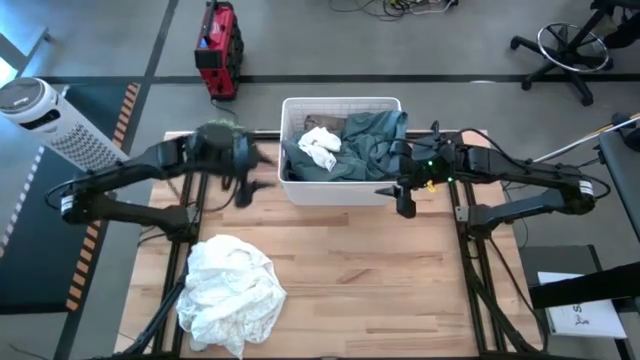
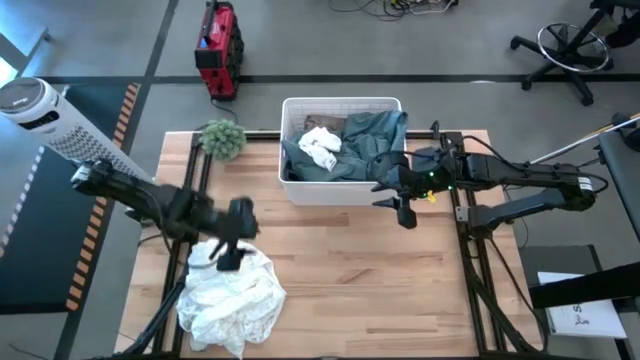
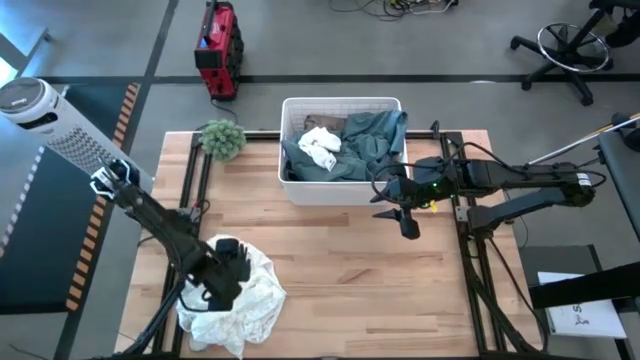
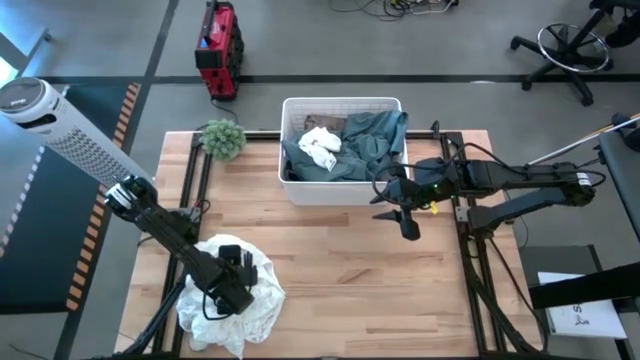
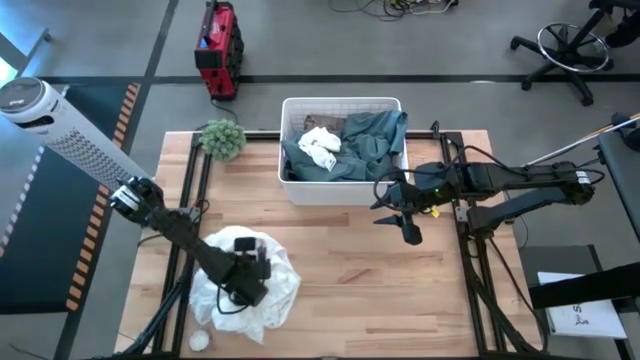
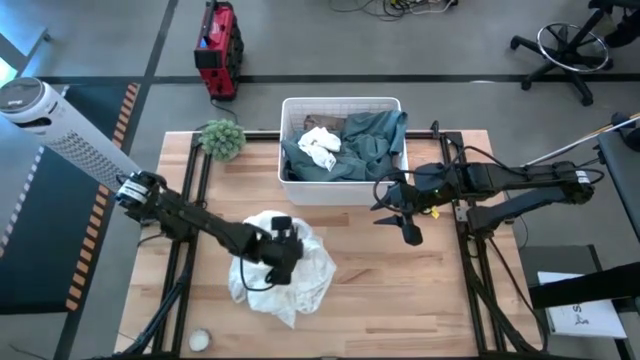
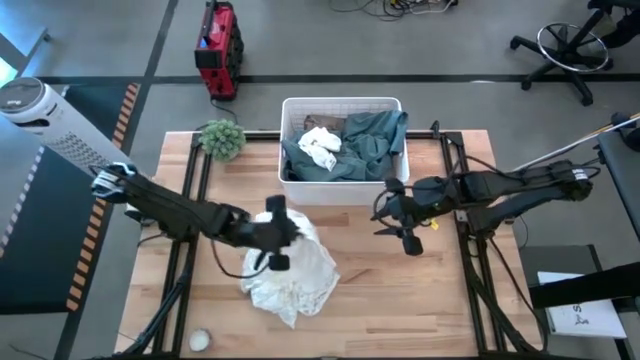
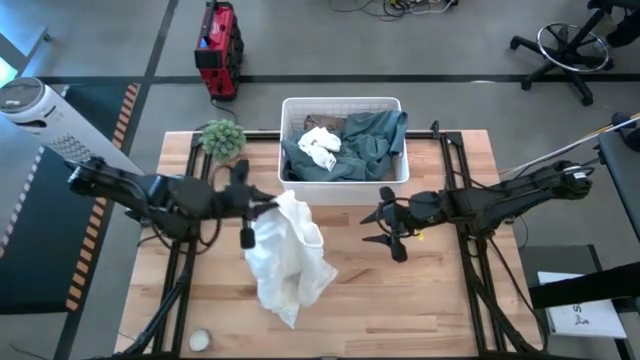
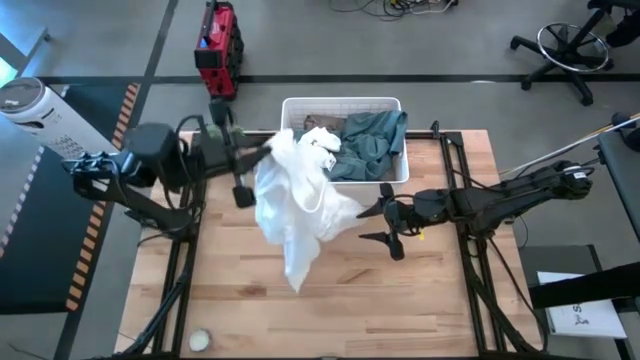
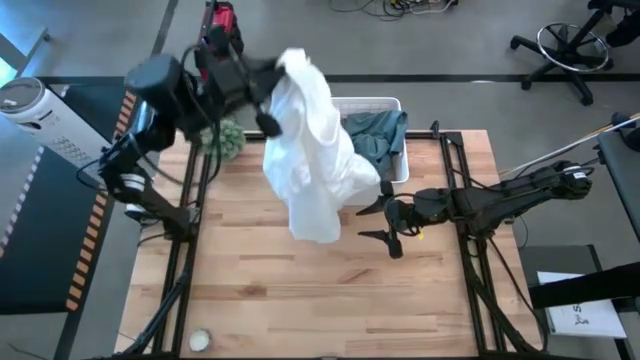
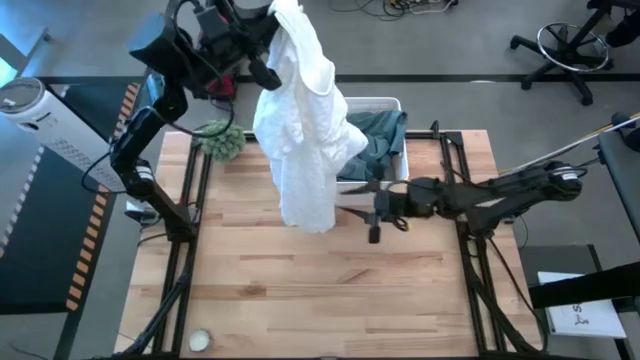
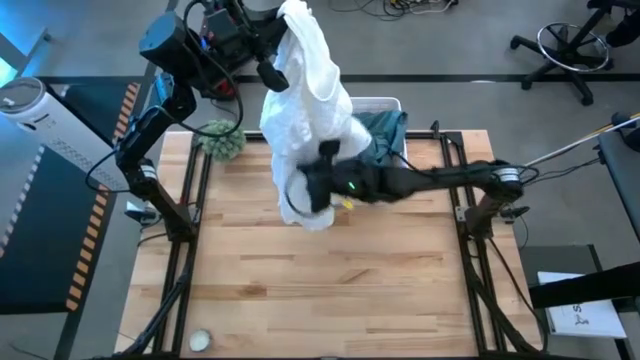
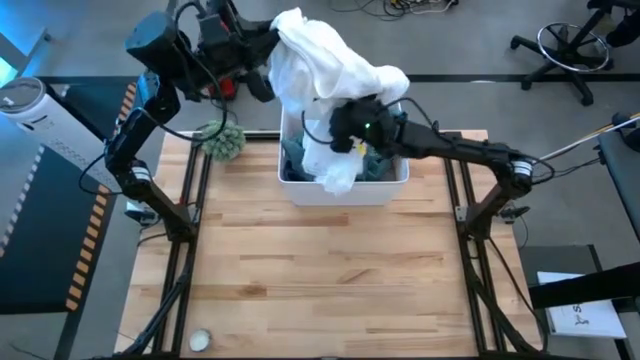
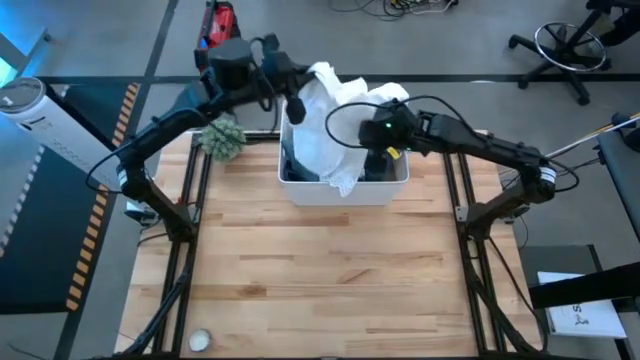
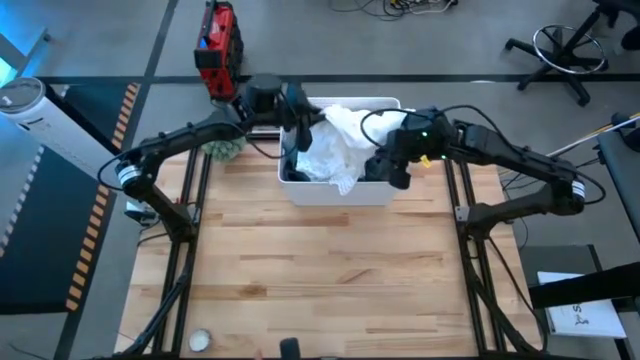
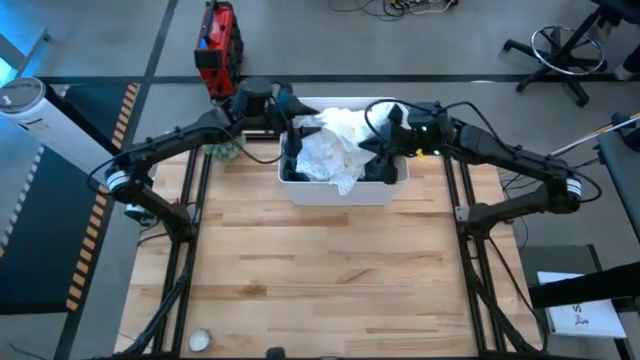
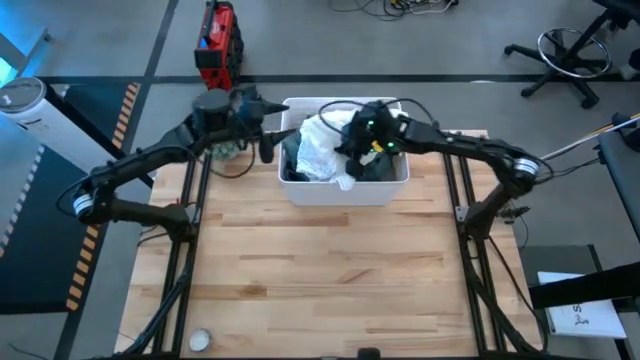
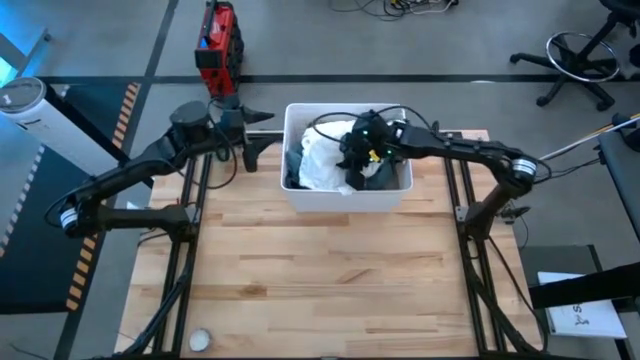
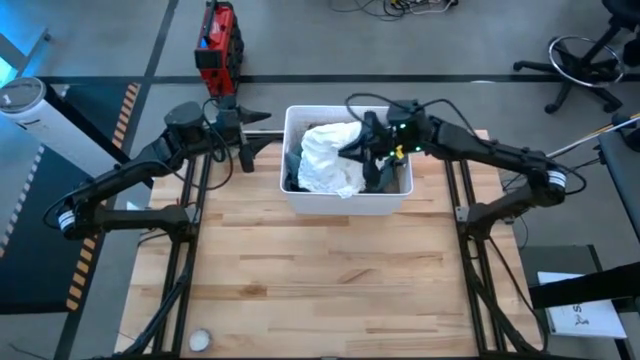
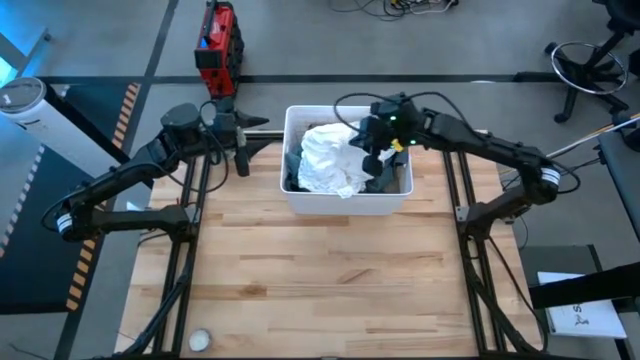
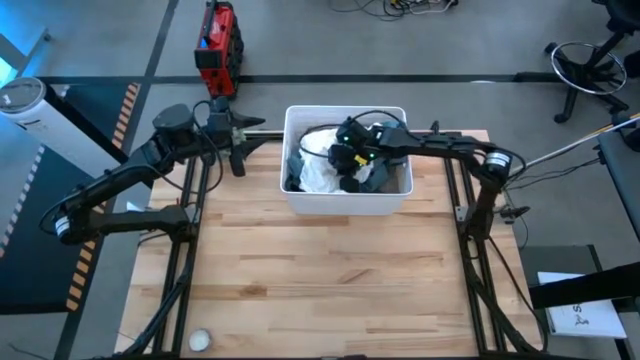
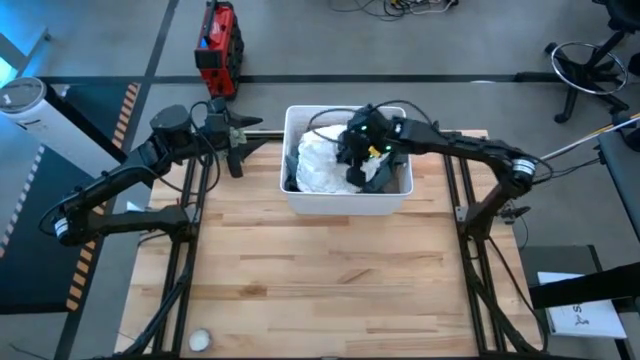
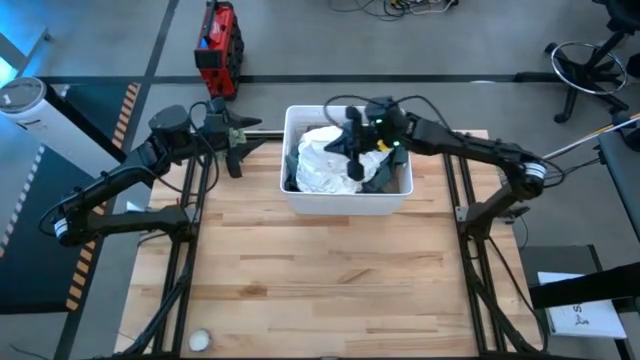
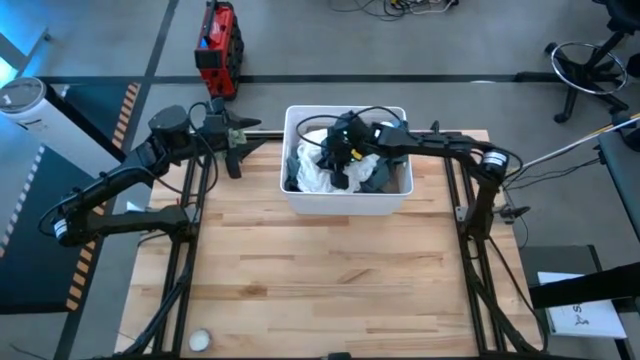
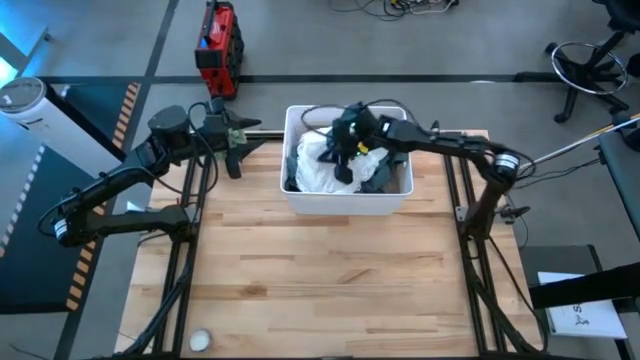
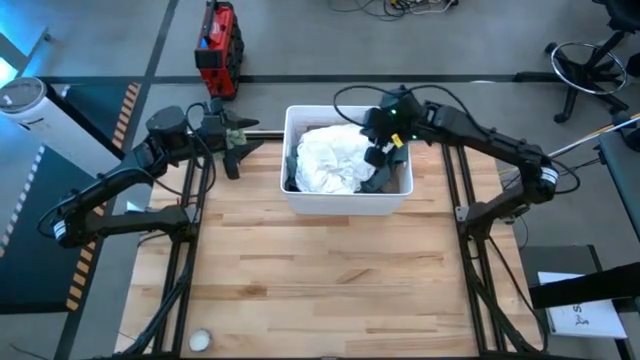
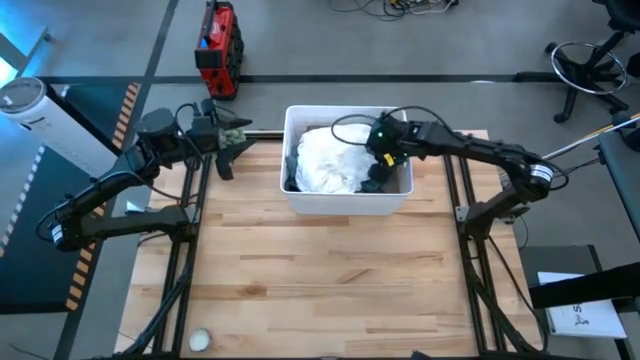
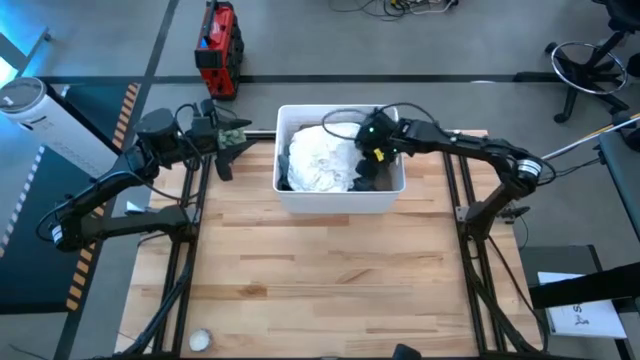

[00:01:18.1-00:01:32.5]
Task: Sort clothes
Put the white cloth into the white bin

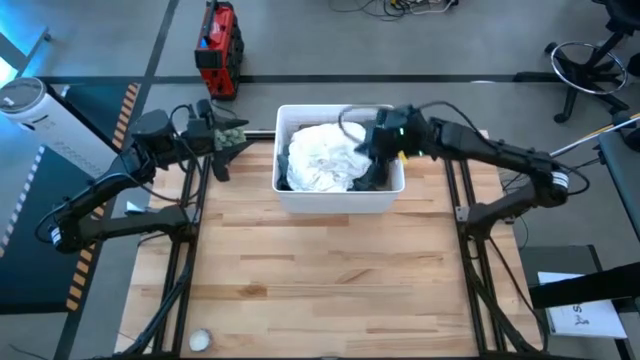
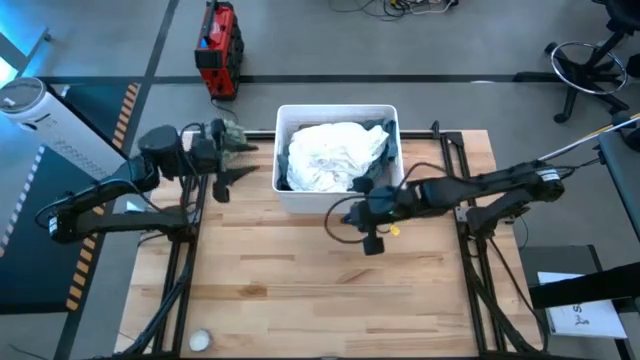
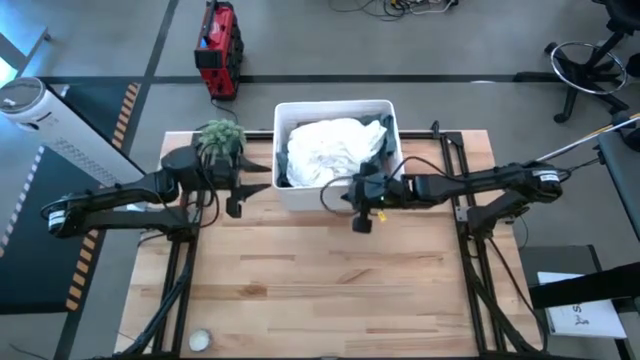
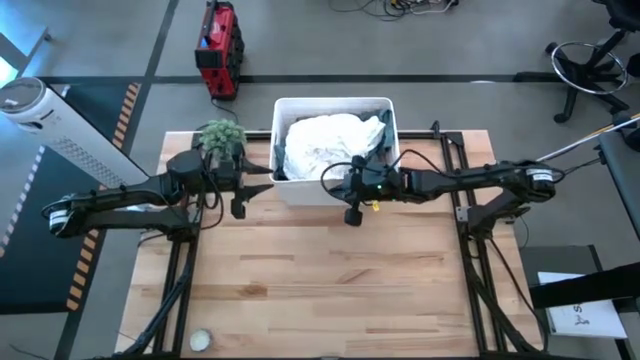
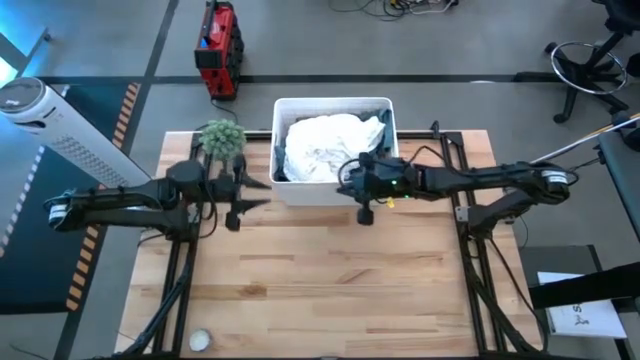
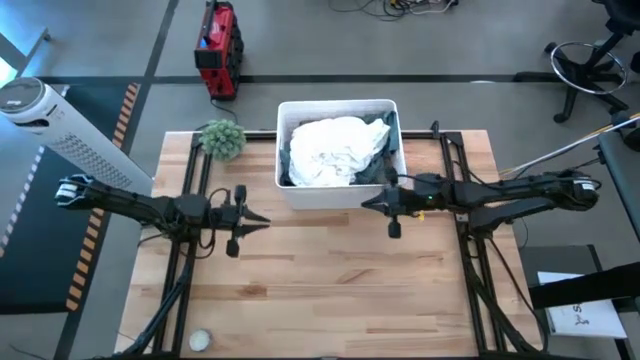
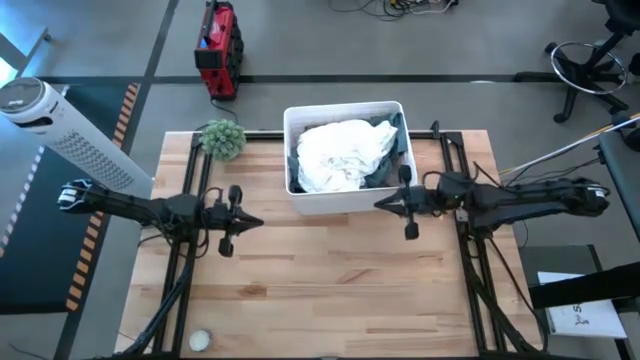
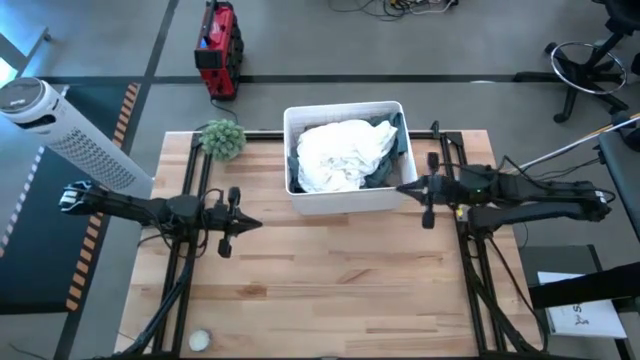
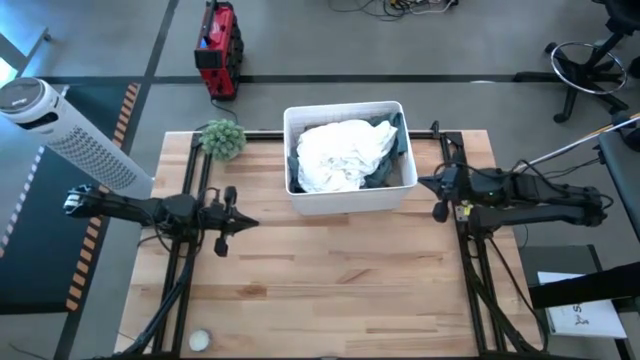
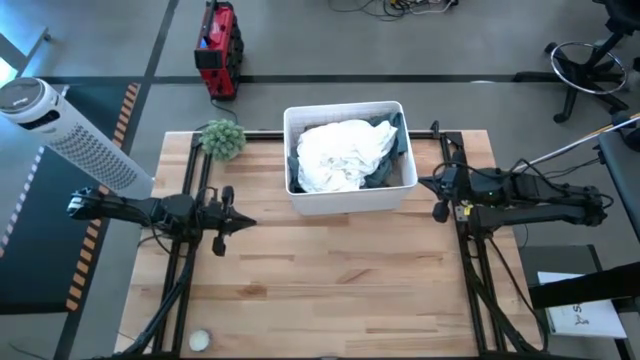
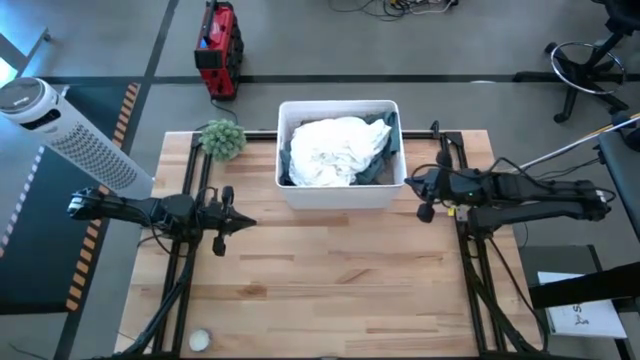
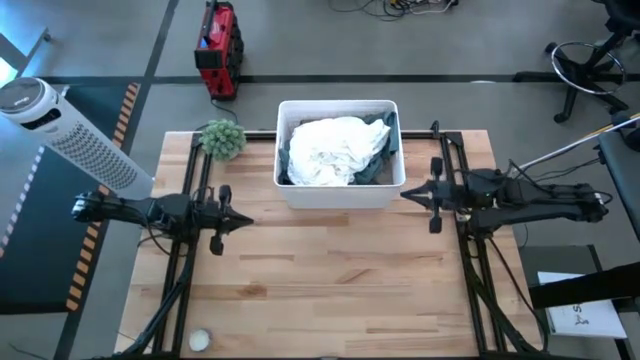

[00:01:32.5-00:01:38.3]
Adjust the white bin

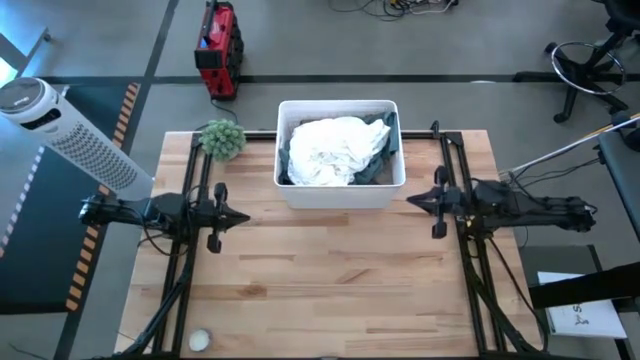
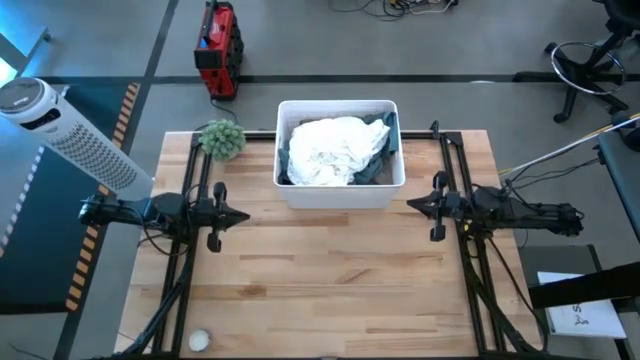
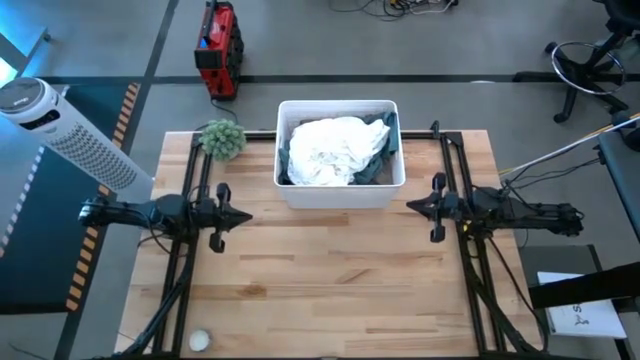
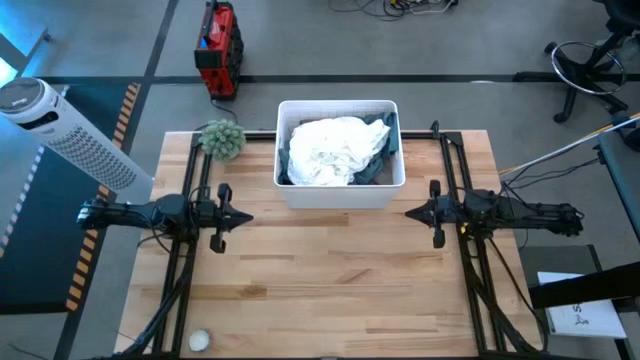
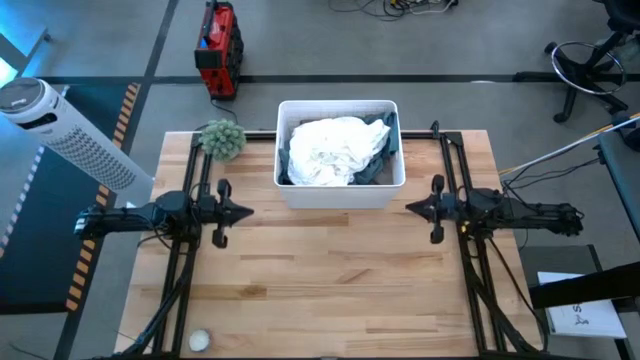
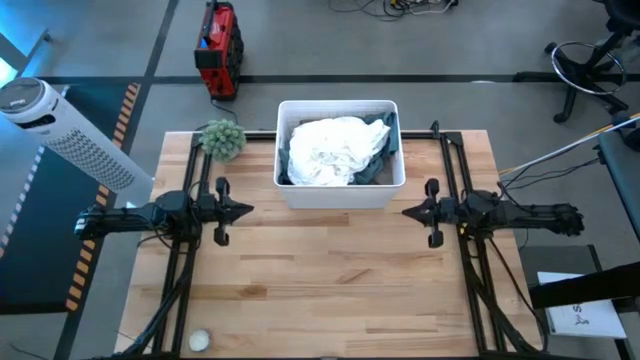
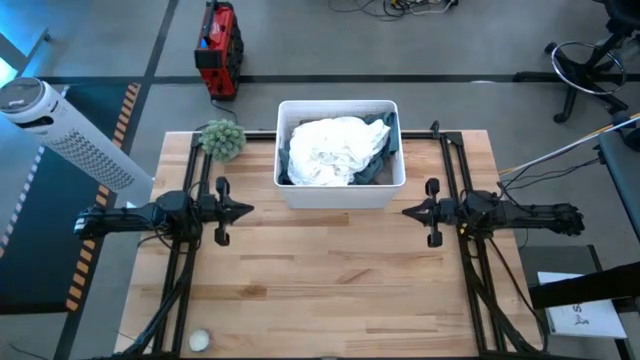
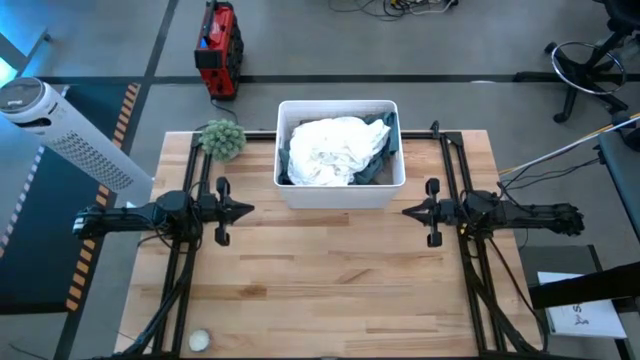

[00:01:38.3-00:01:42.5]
Return to Home Position
